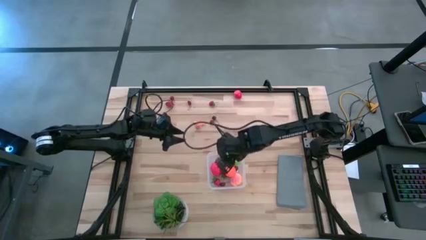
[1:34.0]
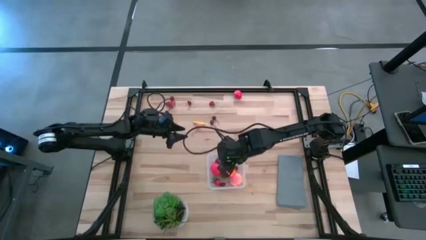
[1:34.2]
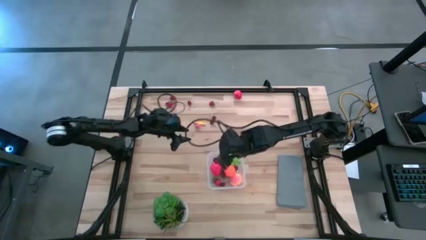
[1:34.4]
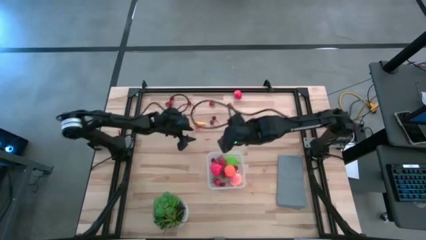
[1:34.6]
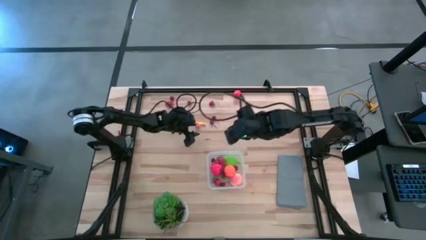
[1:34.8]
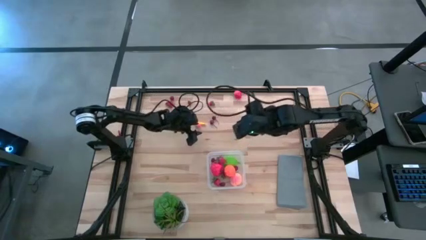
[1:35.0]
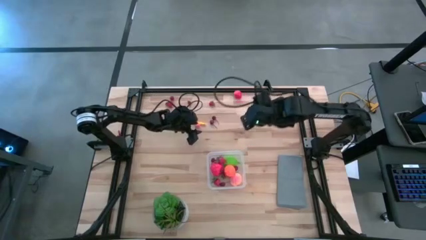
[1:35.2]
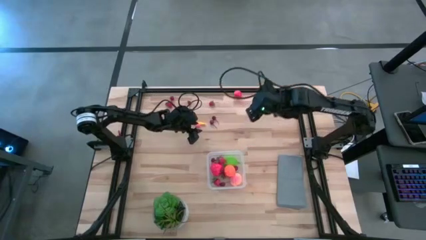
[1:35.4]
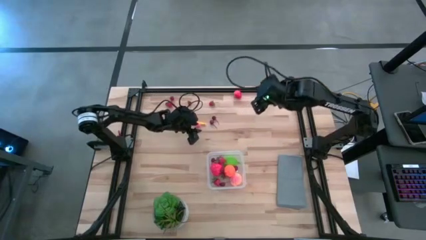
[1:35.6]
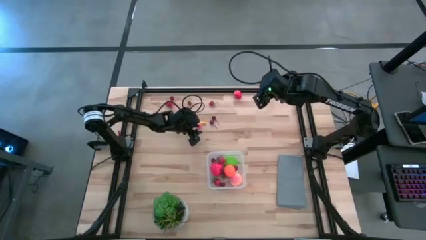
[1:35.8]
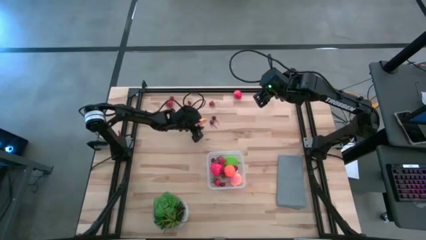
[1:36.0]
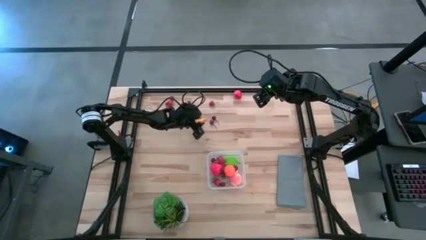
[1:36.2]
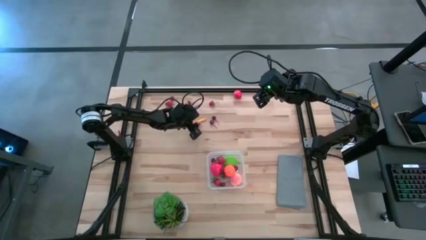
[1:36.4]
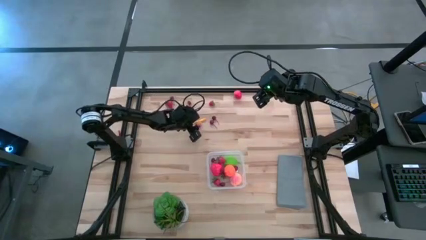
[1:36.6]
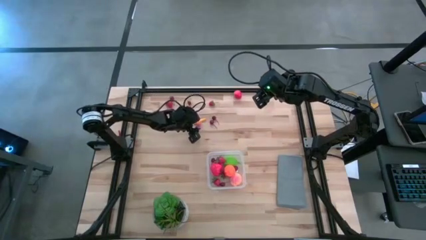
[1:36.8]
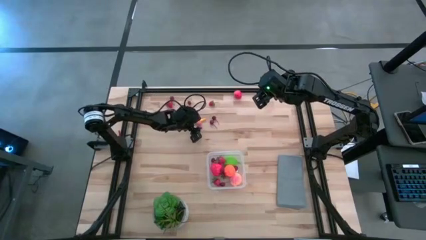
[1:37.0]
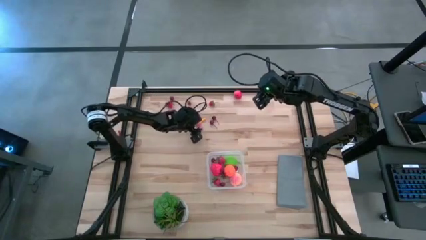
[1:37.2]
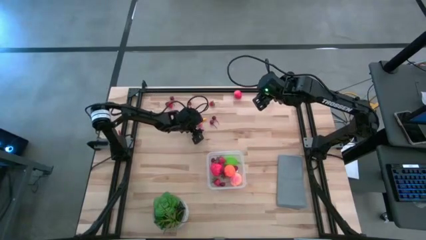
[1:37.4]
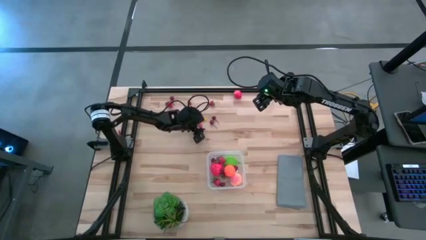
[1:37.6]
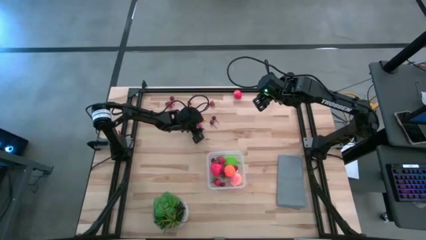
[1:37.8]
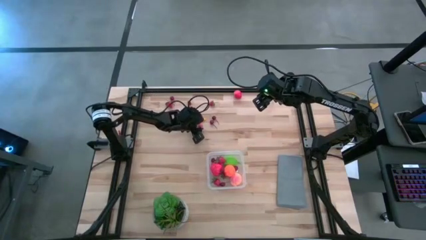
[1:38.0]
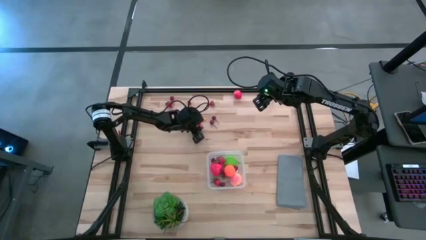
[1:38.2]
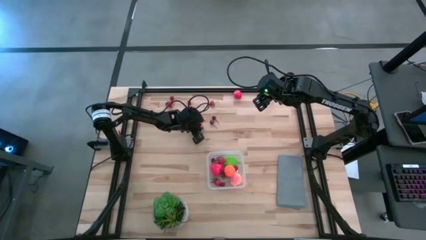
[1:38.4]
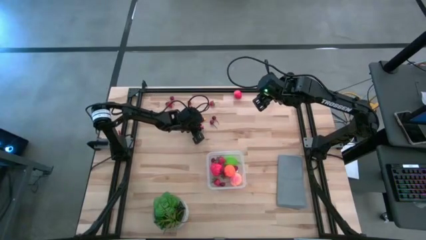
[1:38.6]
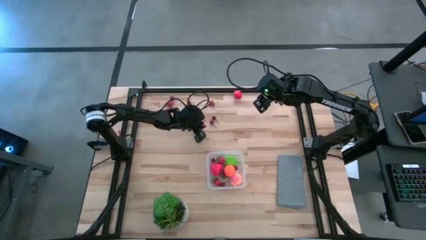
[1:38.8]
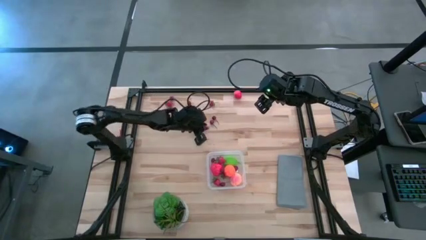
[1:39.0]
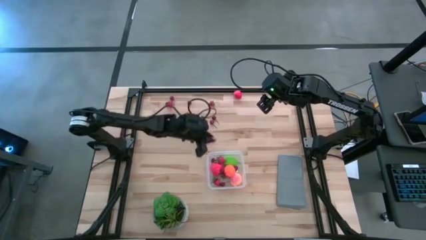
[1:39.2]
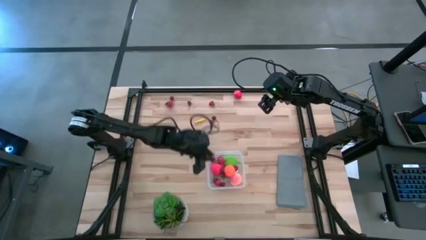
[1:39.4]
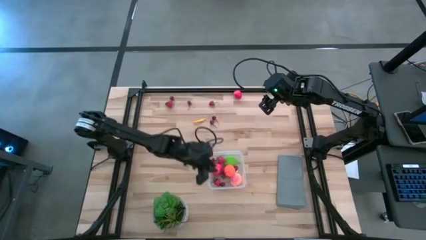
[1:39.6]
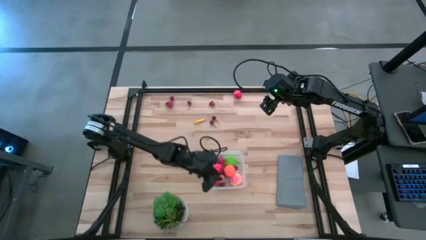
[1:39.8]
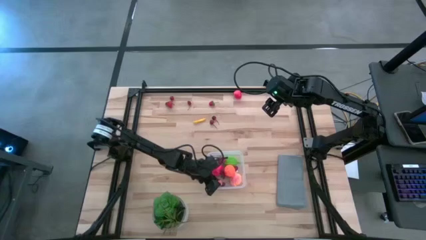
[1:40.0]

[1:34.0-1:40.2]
Task: Pick and placing Produce into tupperware
Put the pink peach into the transparent bin

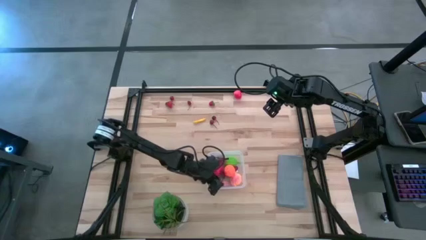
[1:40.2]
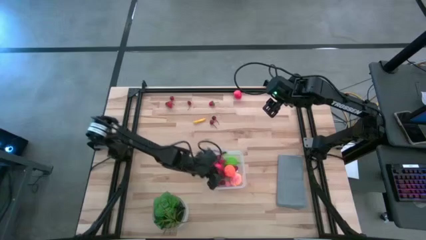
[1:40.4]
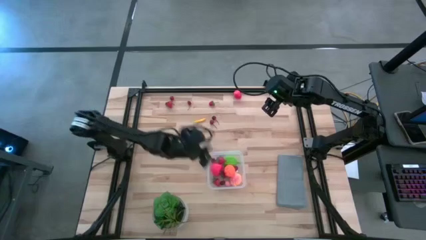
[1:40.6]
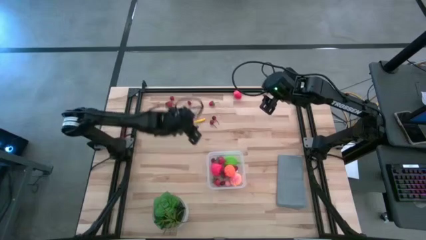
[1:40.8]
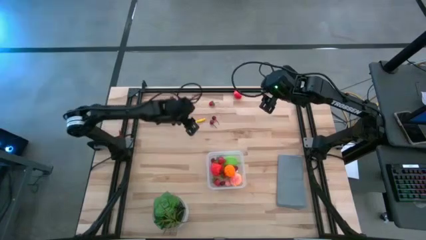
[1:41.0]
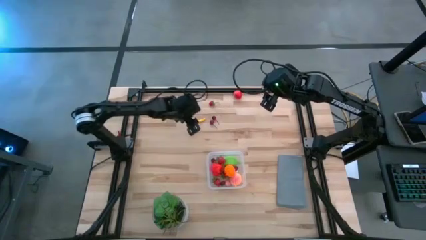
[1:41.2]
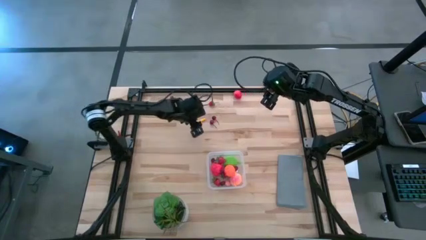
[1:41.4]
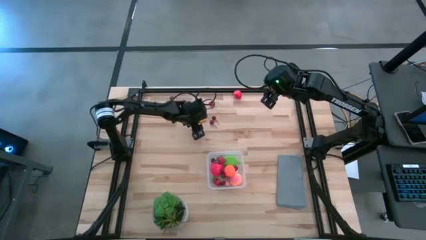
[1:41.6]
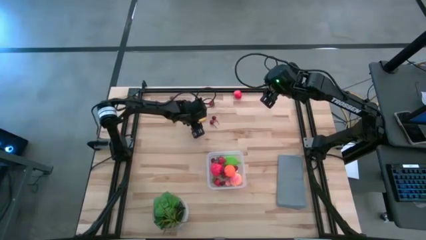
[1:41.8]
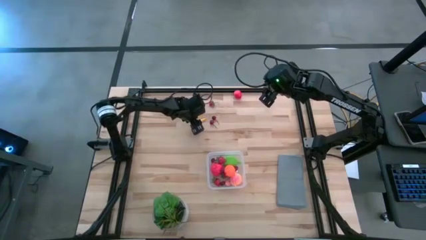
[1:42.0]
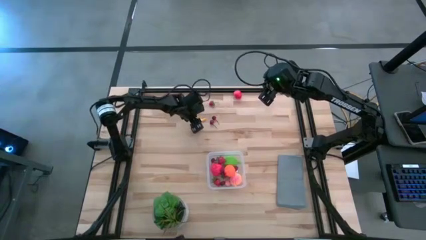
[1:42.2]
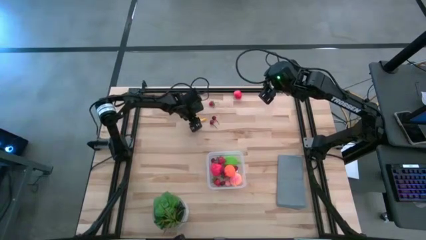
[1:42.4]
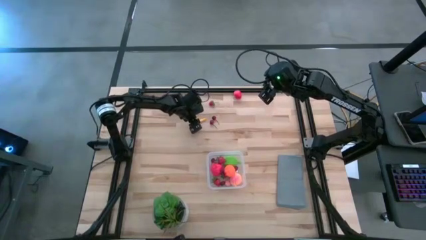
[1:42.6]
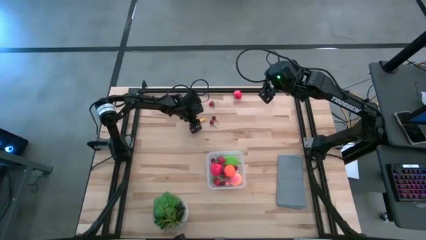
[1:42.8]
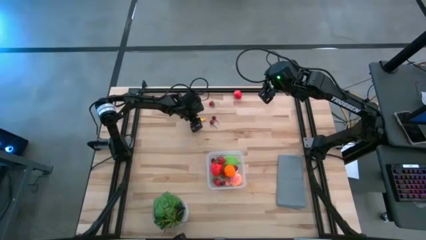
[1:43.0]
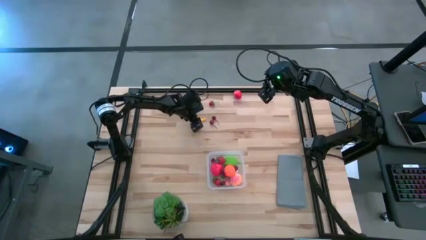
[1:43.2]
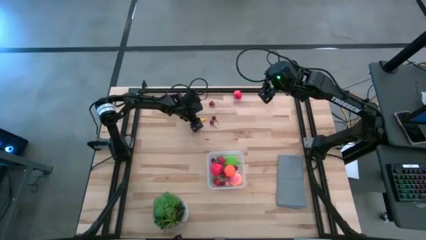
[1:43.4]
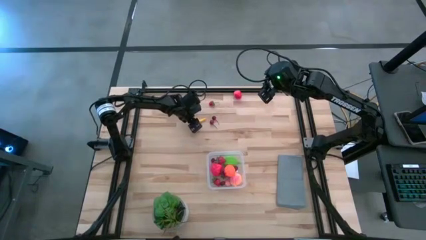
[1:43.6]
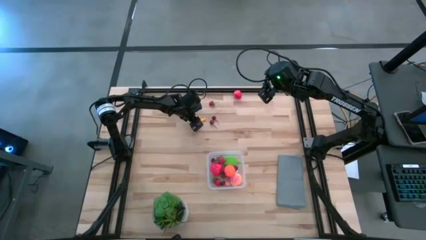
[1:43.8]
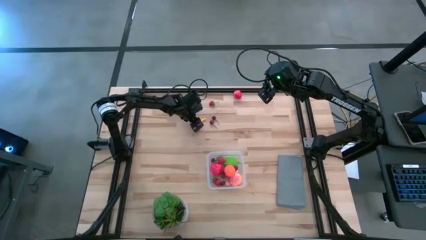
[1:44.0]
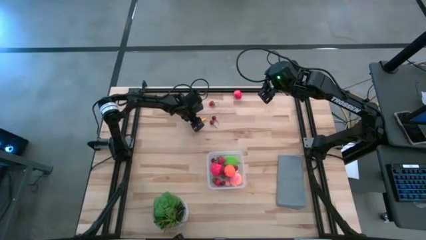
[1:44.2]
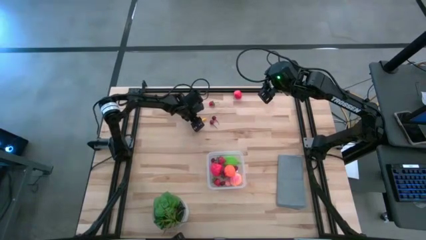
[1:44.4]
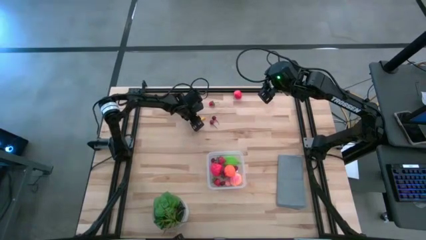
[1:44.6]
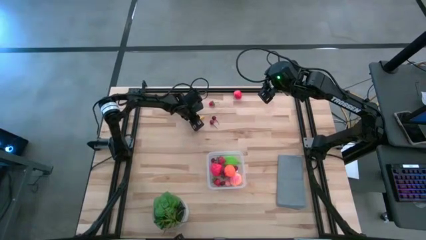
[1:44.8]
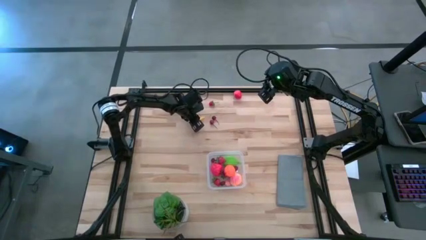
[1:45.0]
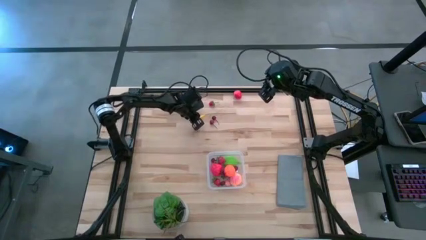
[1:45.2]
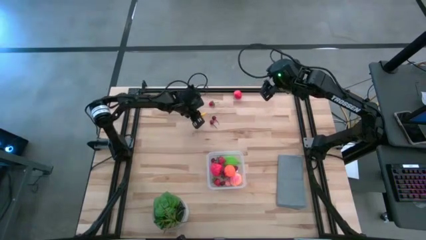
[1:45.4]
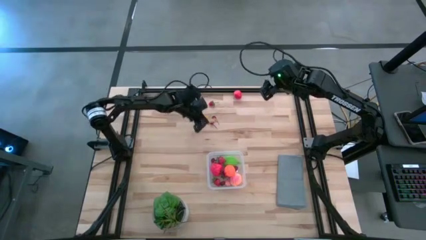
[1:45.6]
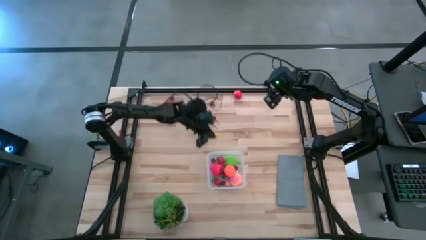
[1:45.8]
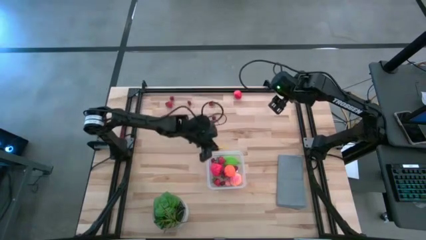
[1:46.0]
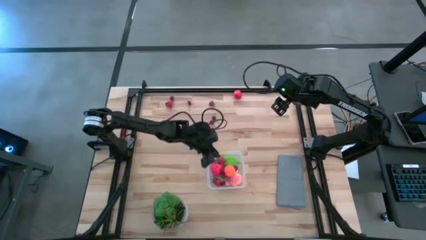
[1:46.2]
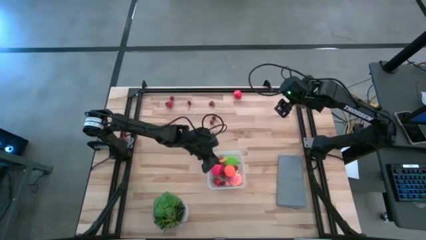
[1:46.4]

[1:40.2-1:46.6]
Put the yellow corn into the transparent bin

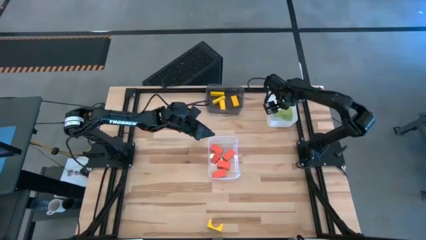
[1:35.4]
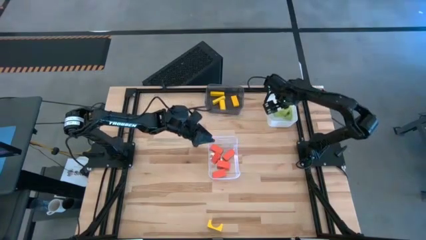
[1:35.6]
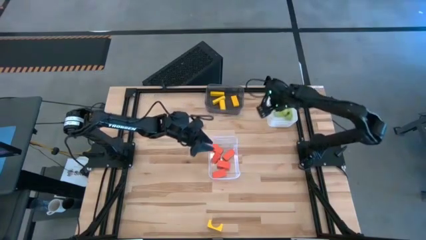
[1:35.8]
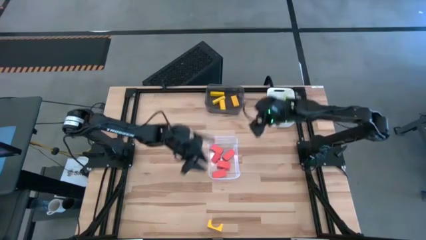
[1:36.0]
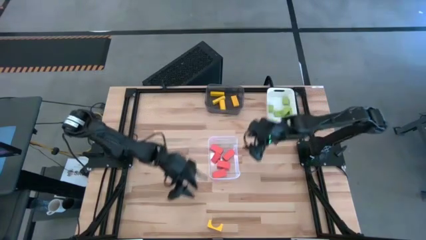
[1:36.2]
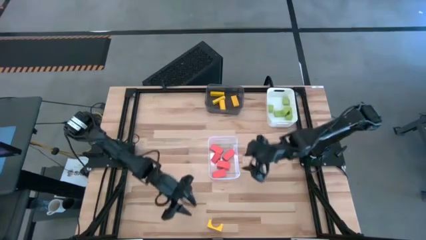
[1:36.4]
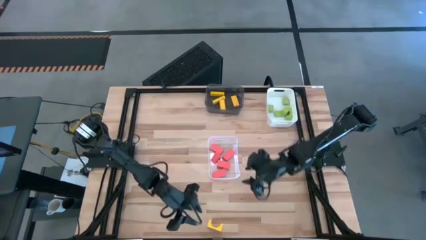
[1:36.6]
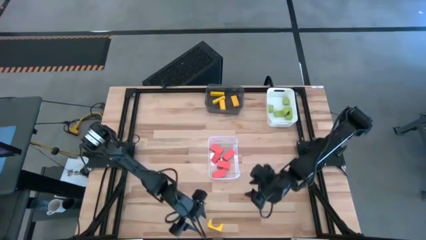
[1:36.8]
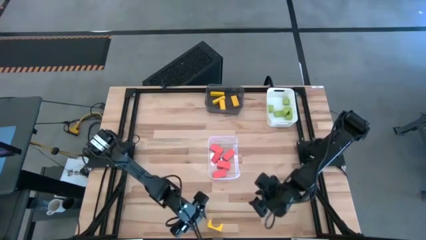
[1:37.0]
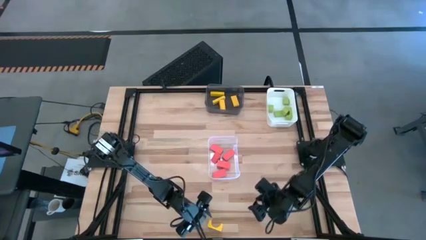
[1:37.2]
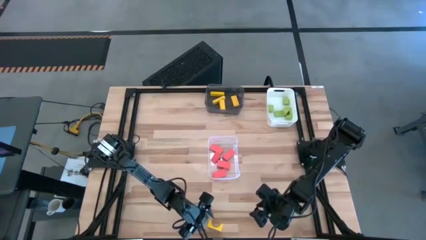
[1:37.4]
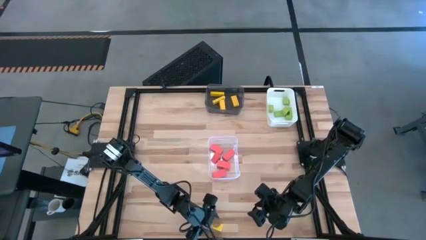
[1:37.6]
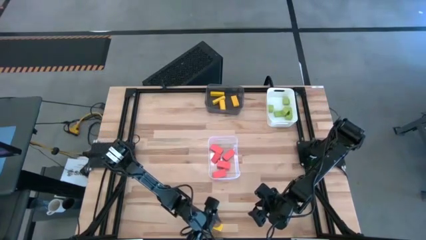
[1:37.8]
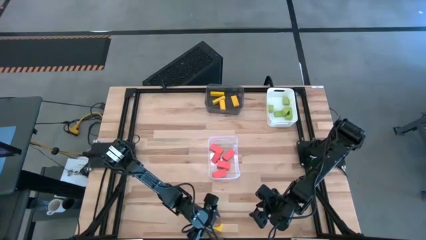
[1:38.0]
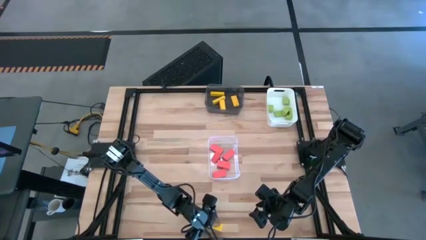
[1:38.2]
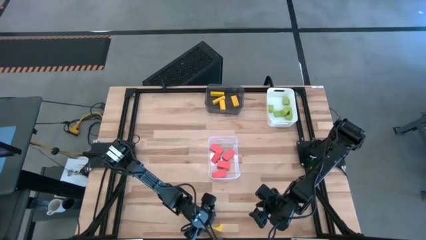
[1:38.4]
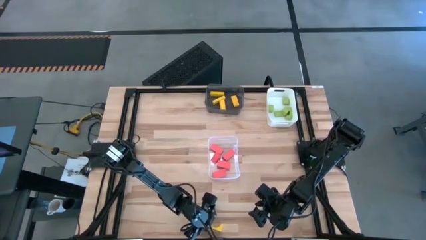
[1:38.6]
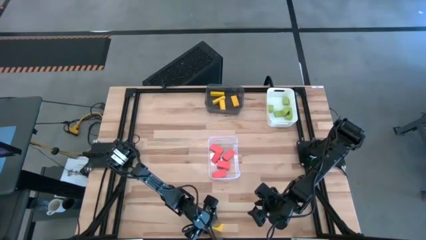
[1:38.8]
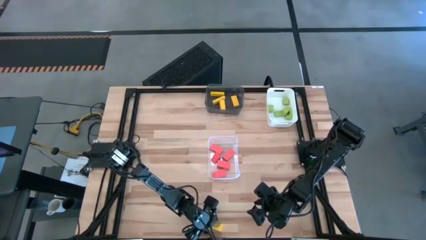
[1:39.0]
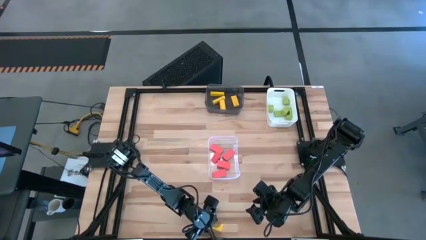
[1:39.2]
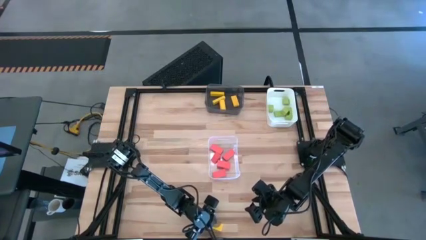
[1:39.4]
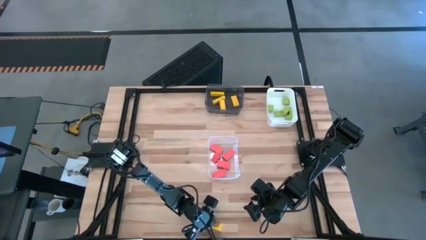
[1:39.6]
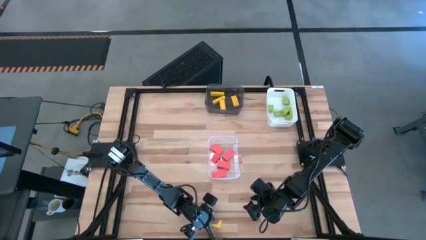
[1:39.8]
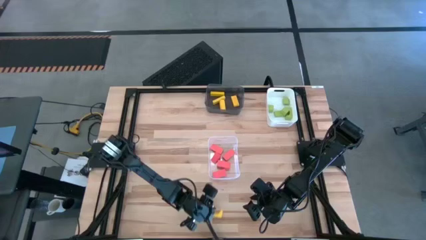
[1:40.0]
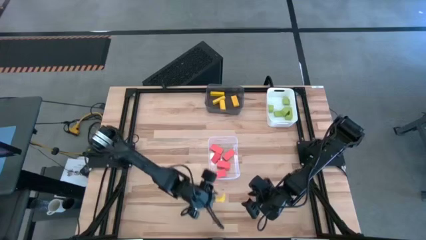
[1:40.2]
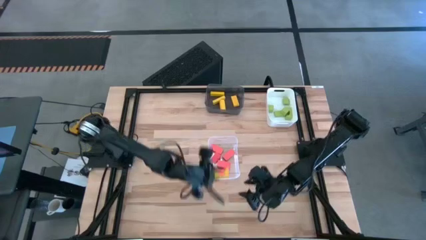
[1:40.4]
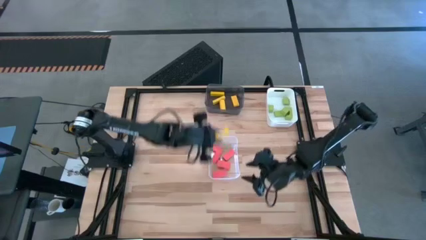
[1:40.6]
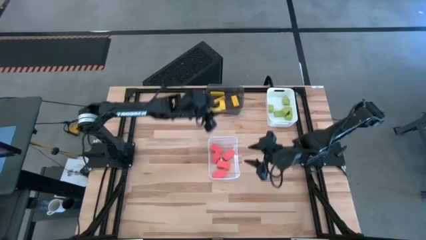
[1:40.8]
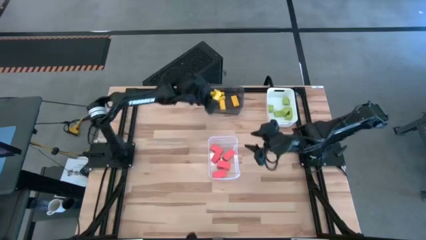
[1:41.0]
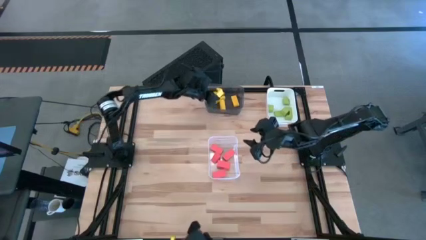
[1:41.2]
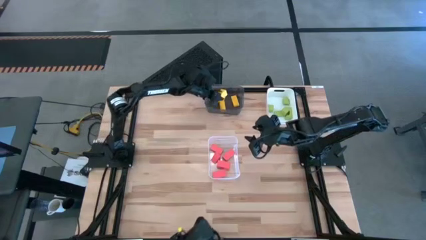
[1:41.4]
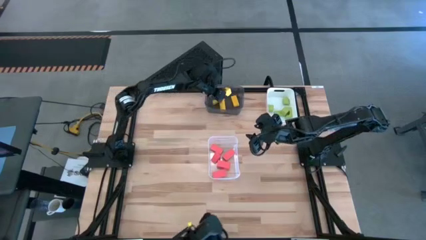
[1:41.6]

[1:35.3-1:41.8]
Task: Sort & place blocks by color
Put the yellow block into the black bin
